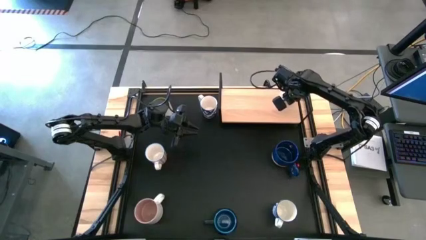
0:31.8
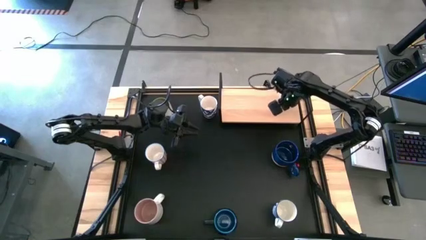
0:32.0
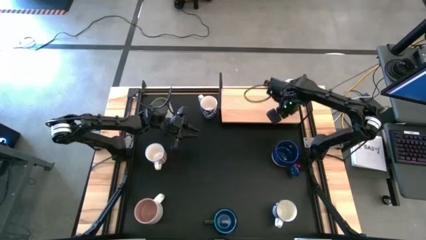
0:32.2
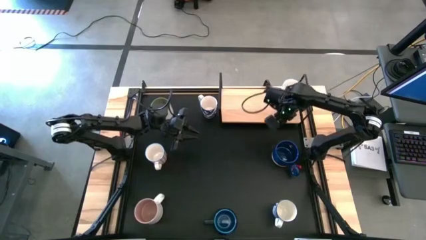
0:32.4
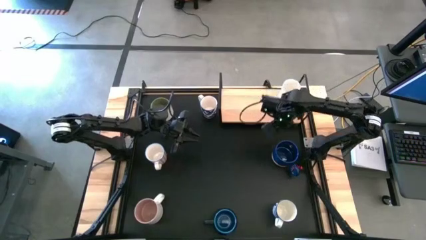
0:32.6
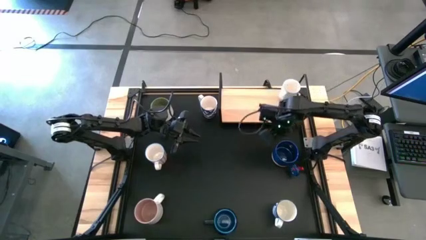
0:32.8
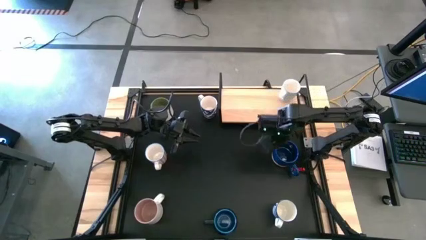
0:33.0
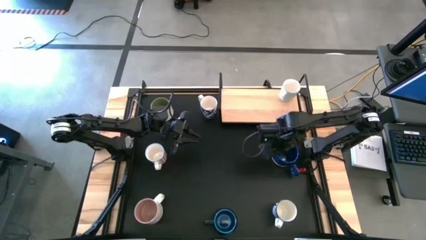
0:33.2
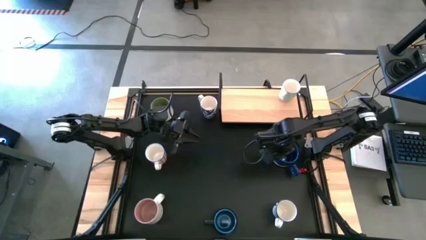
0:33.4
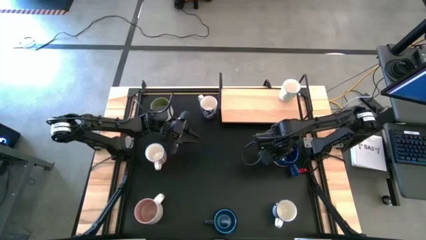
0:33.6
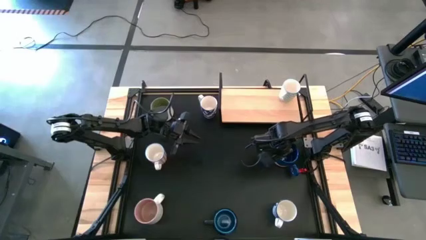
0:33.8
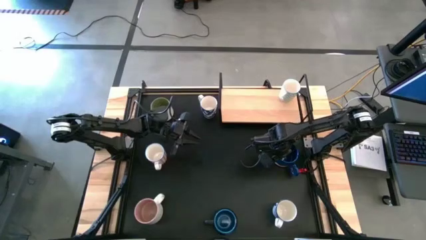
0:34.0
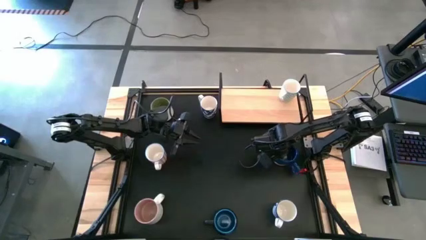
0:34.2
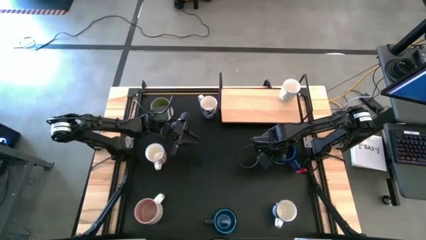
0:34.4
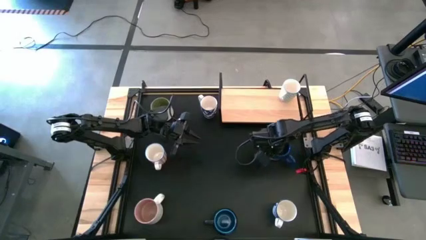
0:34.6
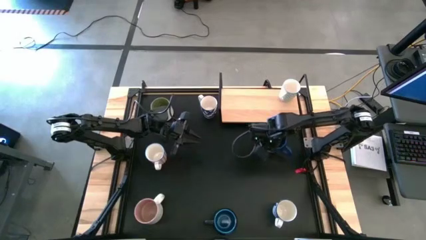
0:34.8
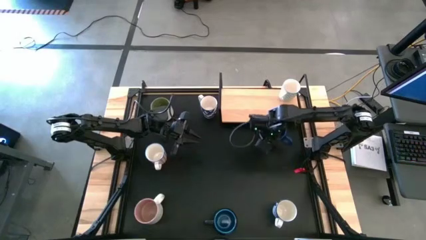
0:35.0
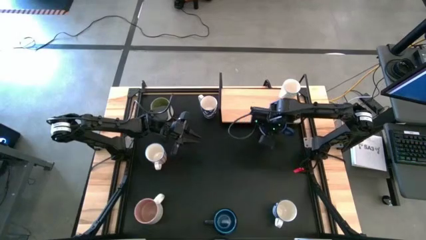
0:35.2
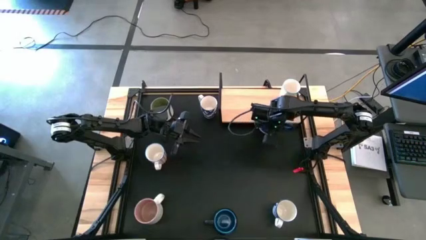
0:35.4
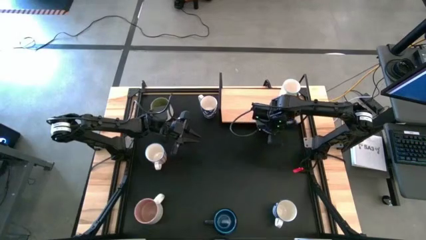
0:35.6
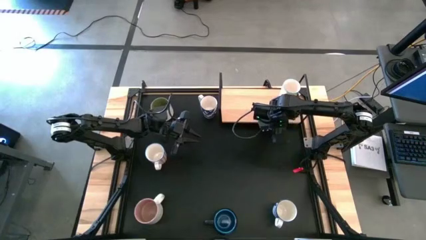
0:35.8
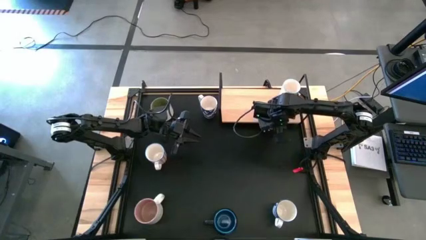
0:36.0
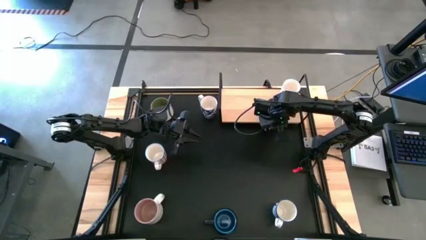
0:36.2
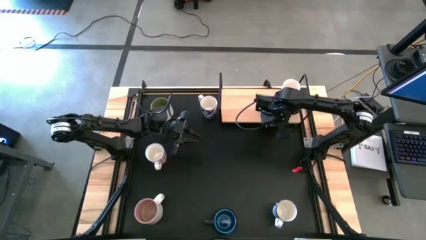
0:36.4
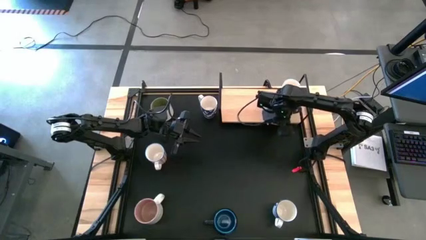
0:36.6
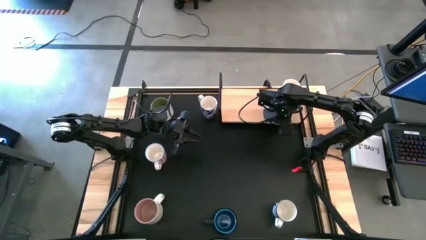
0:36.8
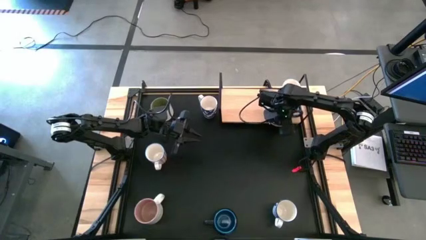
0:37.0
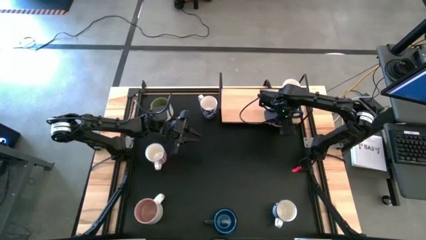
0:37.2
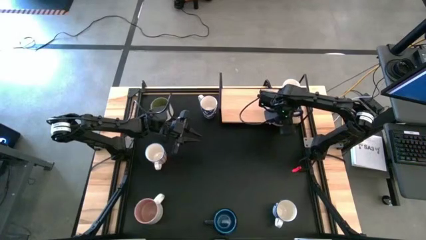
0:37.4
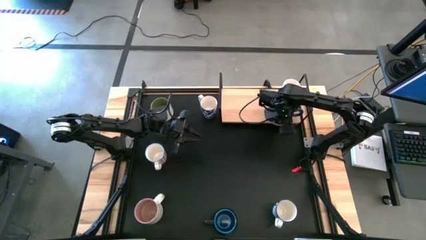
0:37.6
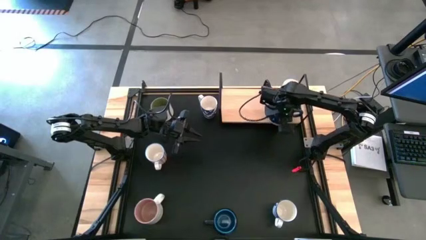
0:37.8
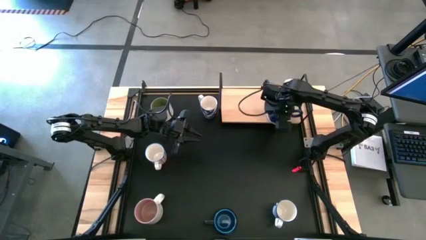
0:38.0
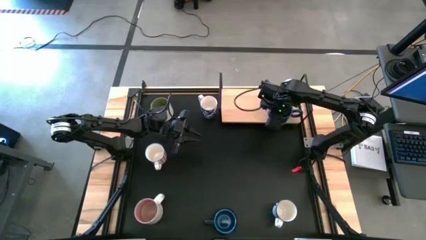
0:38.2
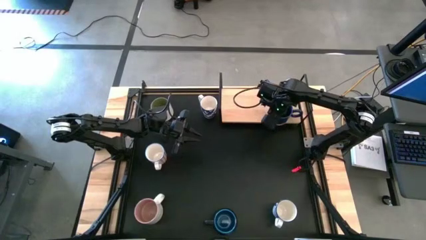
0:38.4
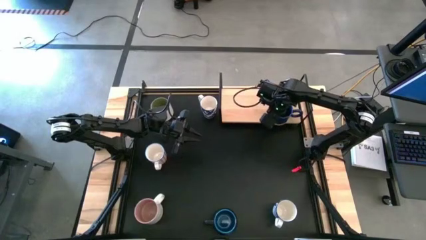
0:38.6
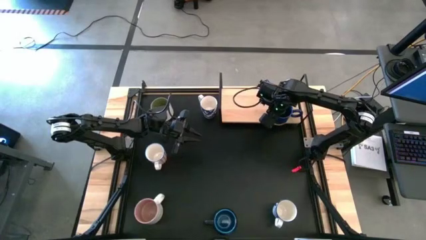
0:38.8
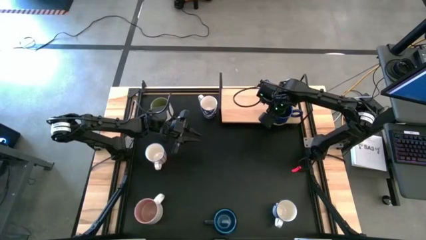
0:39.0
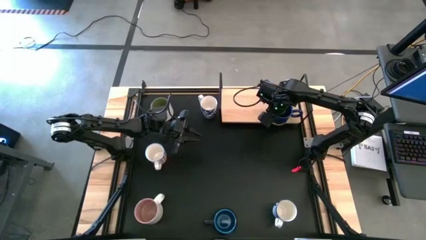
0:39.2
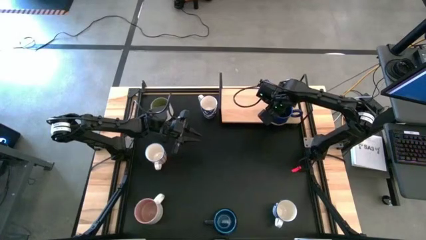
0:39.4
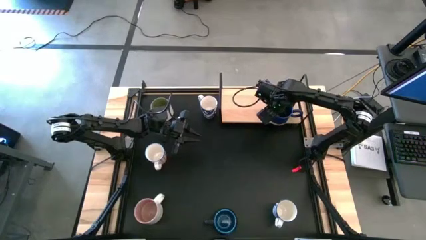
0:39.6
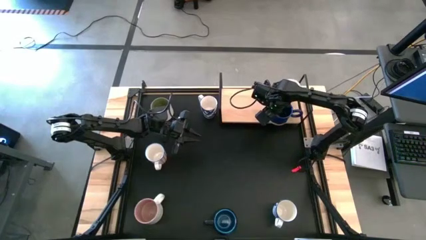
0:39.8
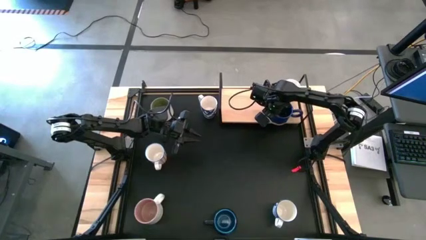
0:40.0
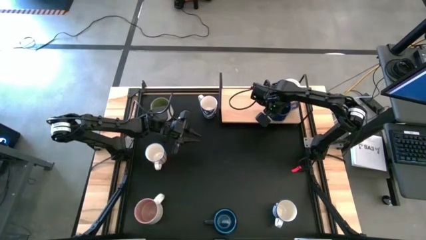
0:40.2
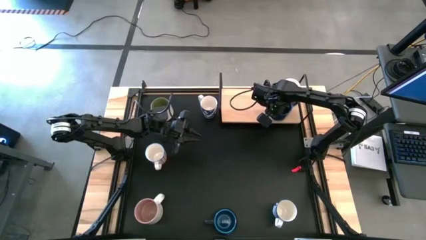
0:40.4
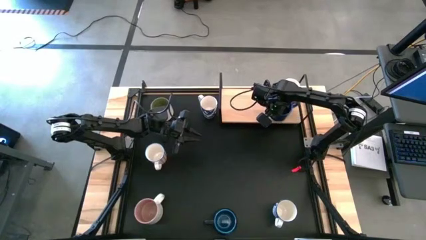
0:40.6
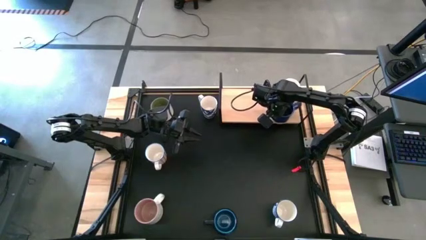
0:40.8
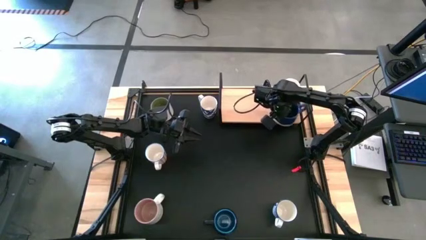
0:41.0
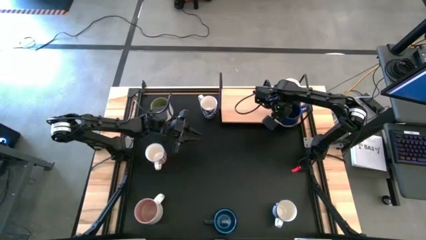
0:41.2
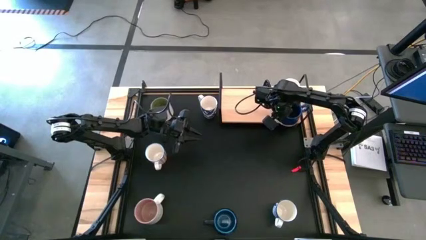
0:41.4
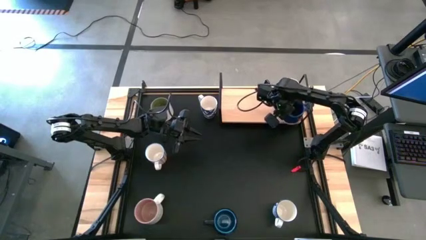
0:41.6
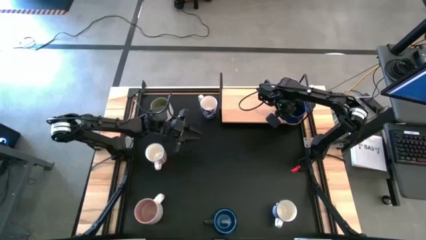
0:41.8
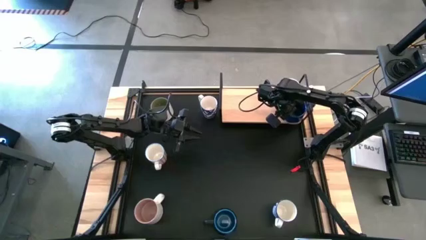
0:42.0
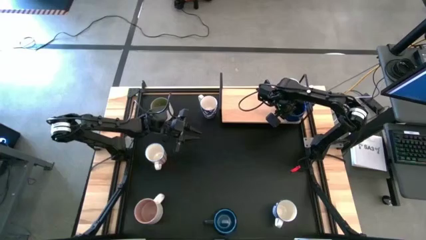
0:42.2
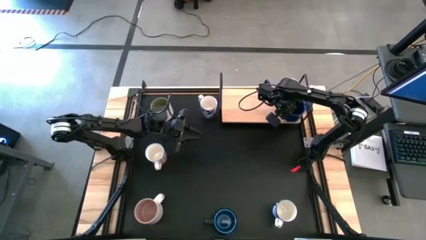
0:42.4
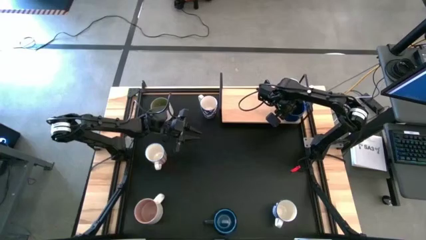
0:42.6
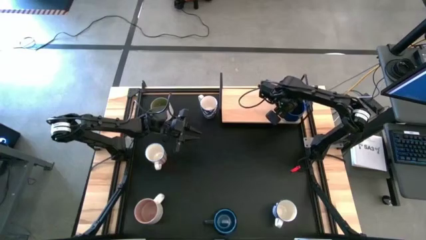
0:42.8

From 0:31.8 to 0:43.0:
Task: Place coffee mugs
Put the dark blue mug on the shelf

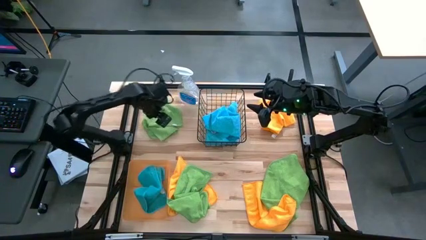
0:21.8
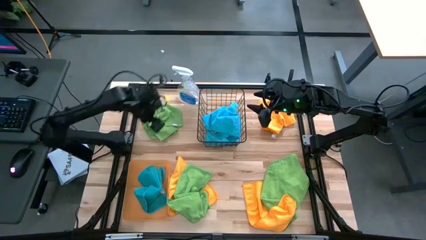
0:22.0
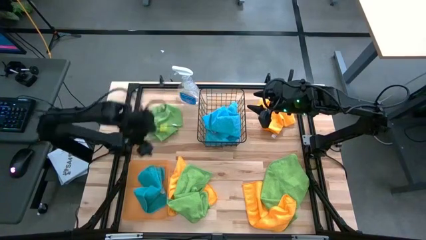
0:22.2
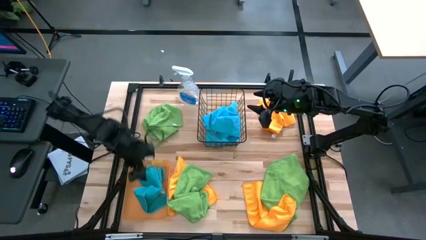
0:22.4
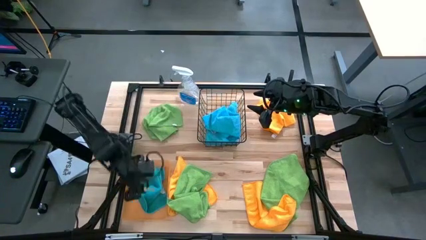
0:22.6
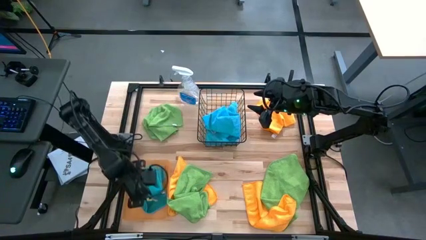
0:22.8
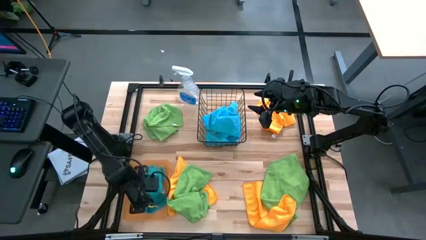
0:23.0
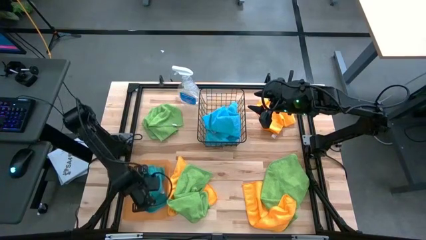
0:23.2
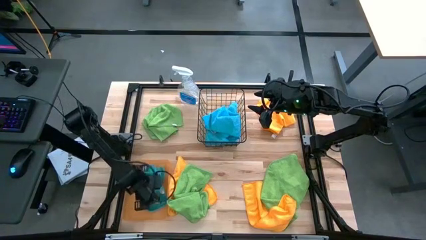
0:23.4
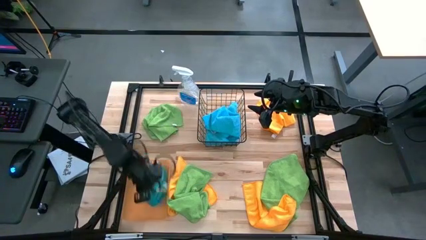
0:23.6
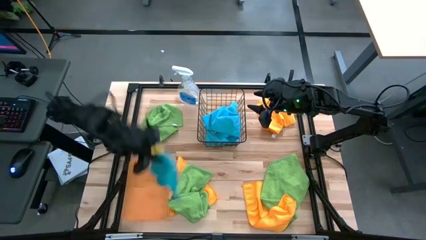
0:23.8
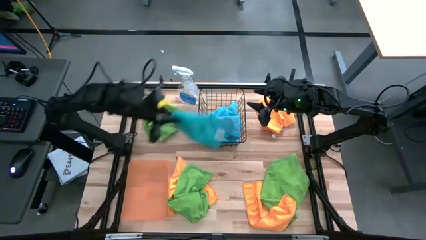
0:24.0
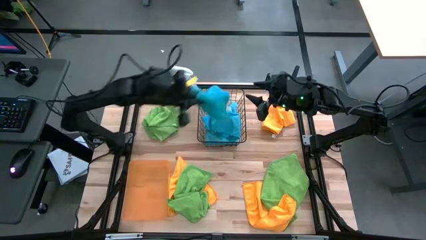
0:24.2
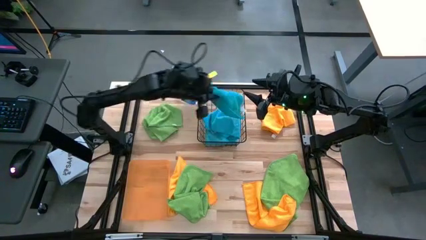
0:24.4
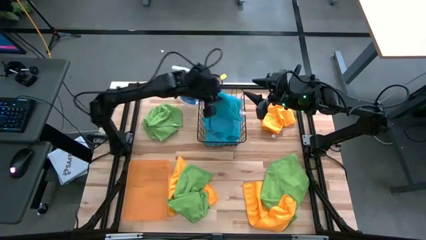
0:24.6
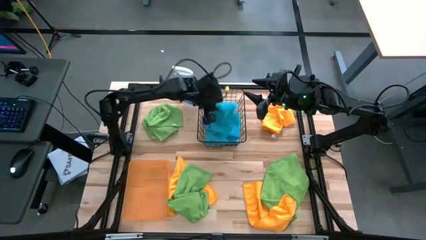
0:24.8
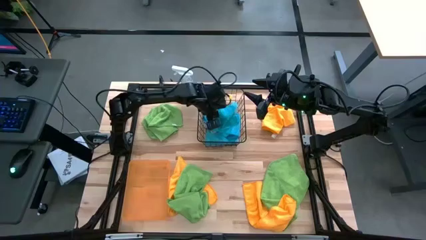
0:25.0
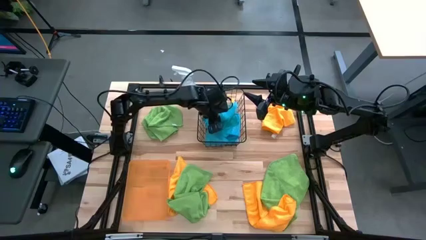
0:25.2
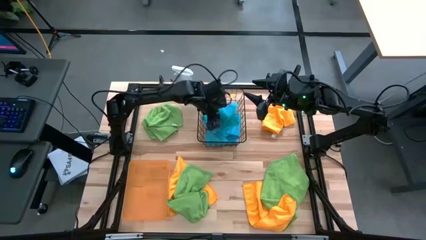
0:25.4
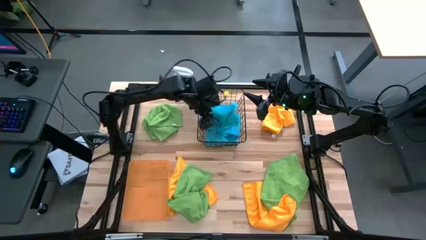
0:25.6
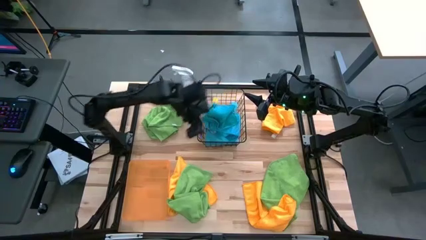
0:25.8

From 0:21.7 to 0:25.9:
Task: Sort microfiber towel by color & place in baskets
Put the blue towel into the black basket

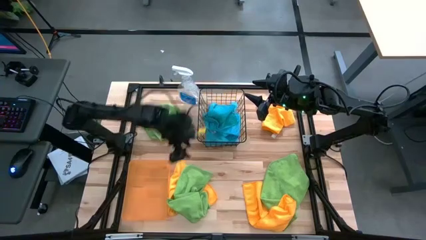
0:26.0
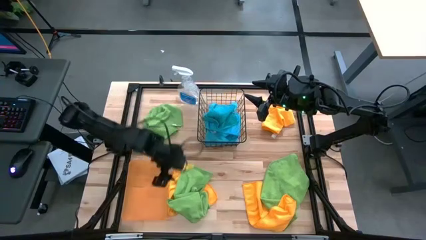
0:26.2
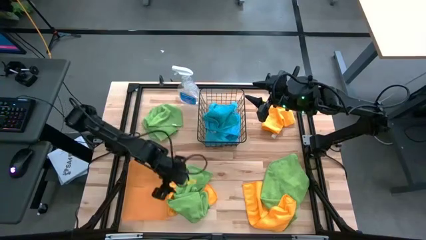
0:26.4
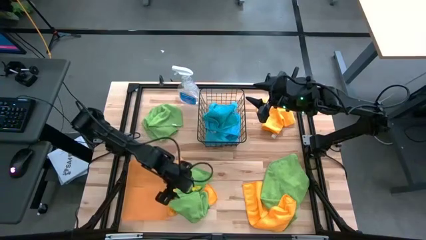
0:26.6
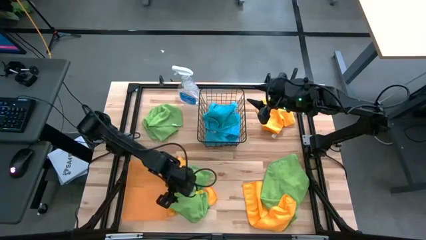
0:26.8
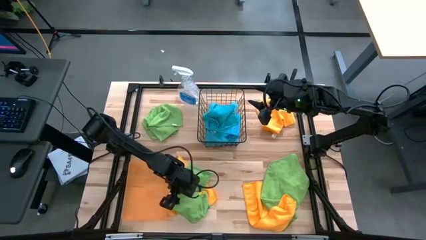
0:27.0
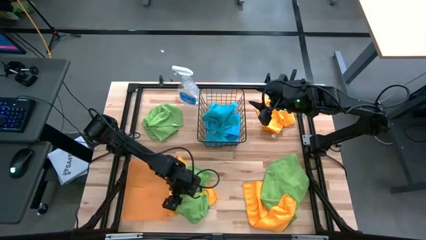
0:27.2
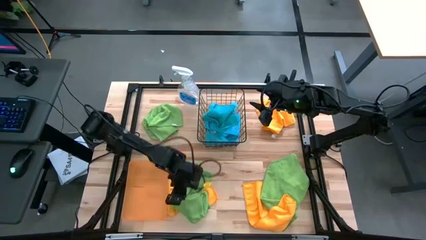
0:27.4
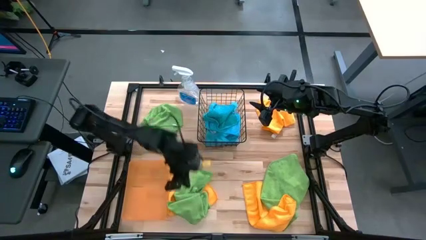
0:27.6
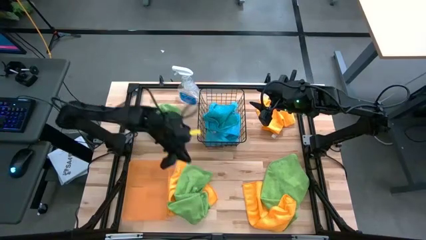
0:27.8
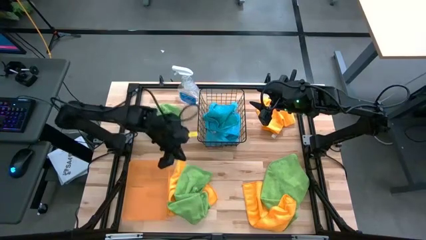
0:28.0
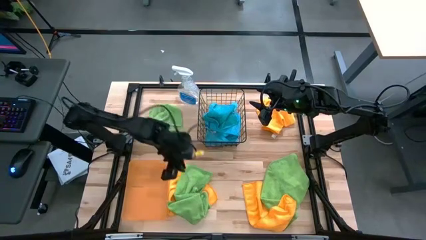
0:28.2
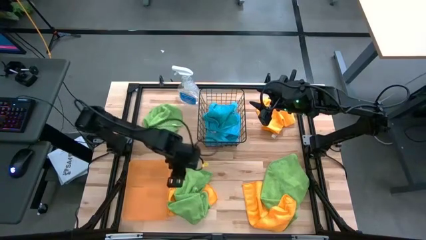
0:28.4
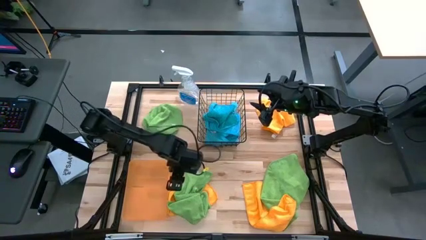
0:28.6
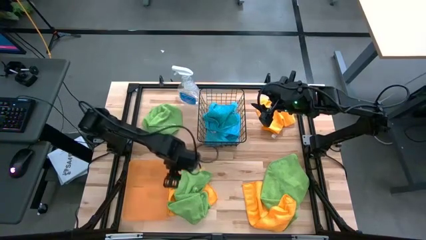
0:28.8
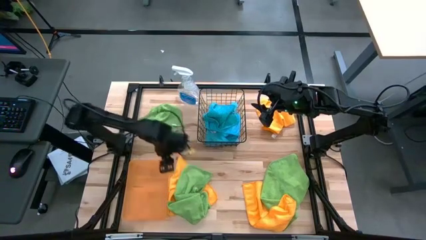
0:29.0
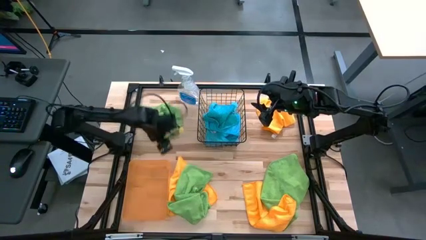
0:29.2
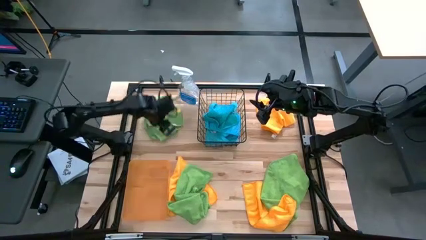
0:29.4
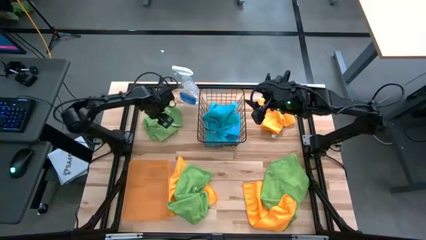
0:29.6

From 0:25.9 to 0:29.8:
Put the top left green towel into the orange bin
